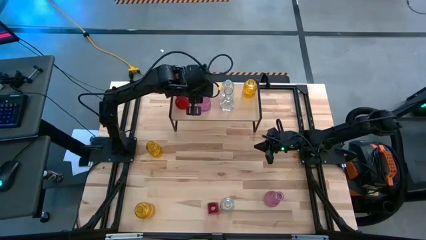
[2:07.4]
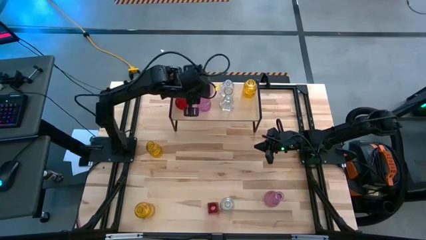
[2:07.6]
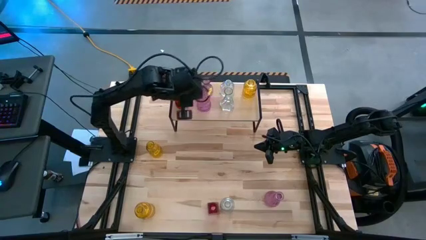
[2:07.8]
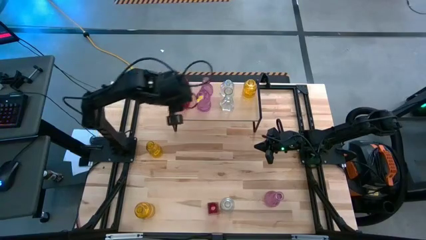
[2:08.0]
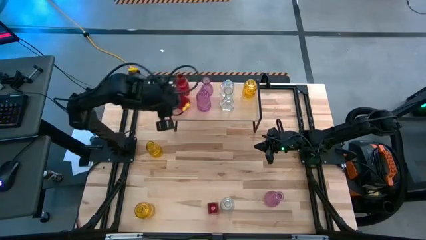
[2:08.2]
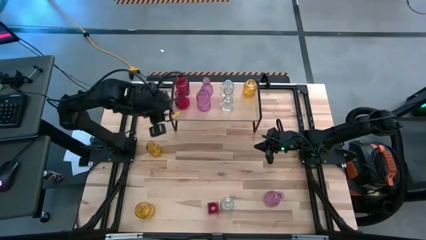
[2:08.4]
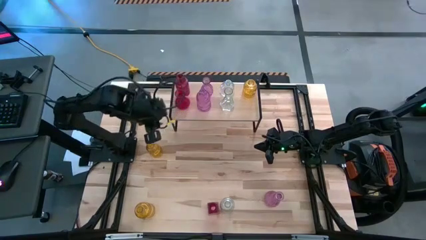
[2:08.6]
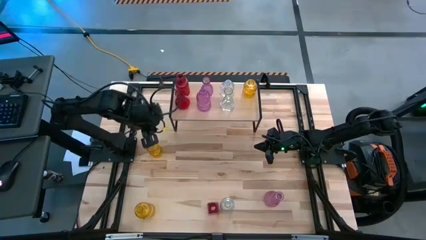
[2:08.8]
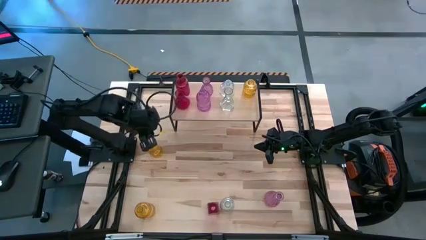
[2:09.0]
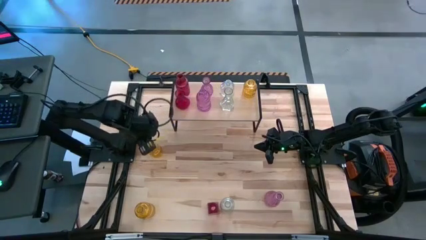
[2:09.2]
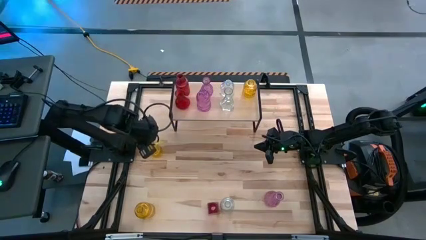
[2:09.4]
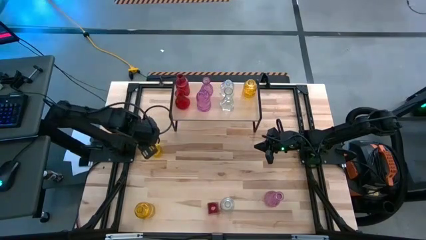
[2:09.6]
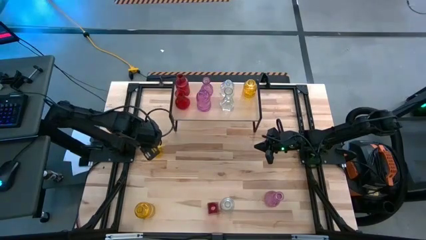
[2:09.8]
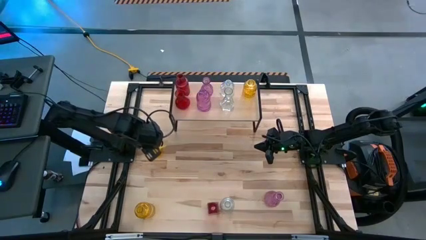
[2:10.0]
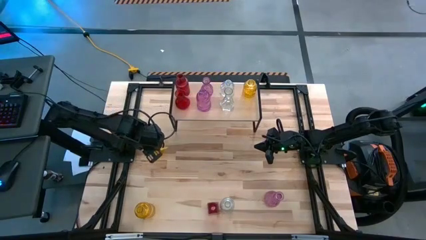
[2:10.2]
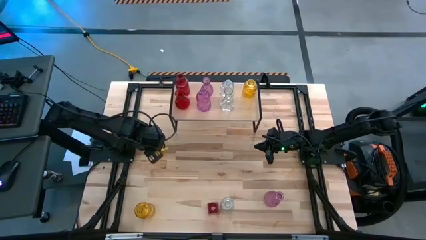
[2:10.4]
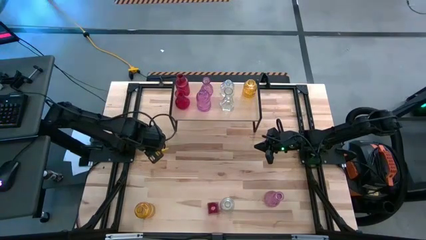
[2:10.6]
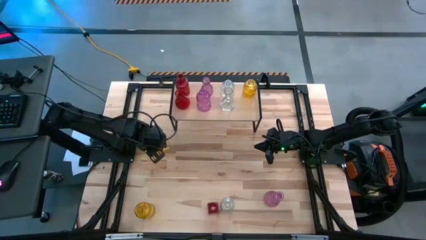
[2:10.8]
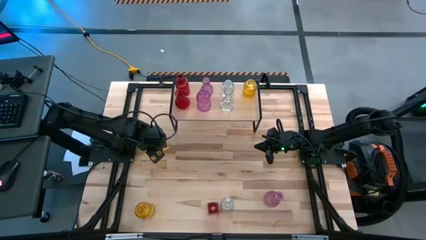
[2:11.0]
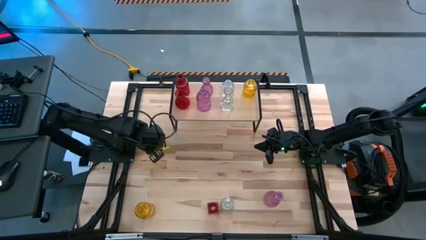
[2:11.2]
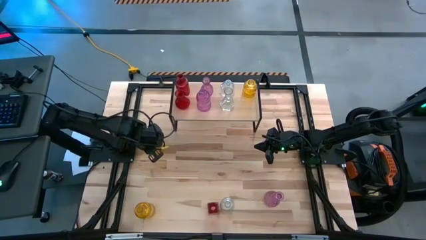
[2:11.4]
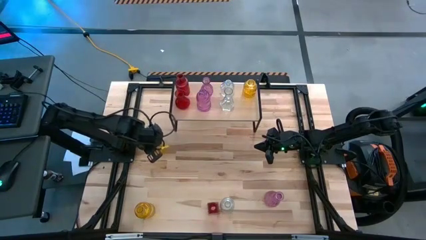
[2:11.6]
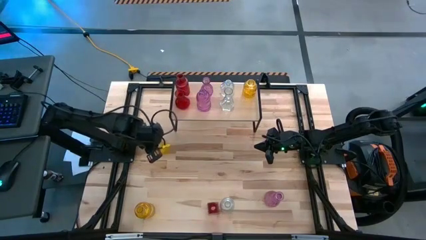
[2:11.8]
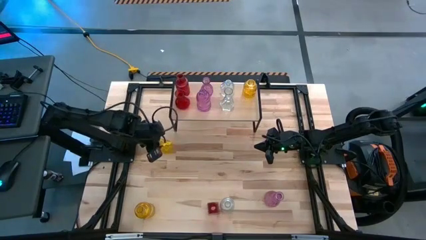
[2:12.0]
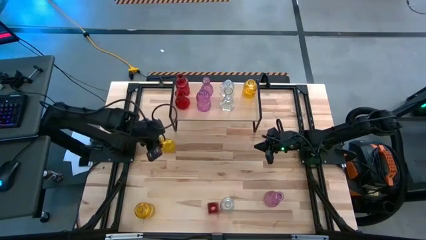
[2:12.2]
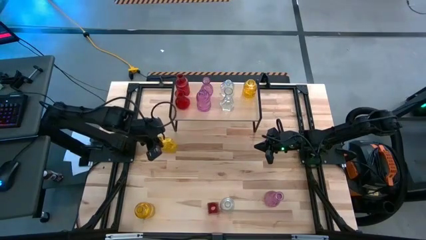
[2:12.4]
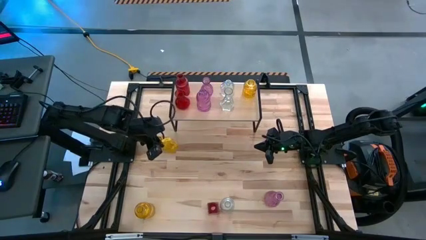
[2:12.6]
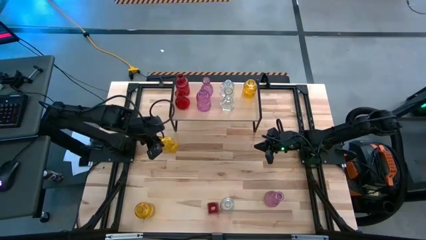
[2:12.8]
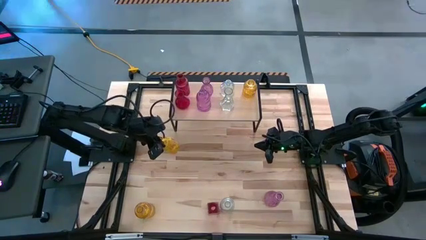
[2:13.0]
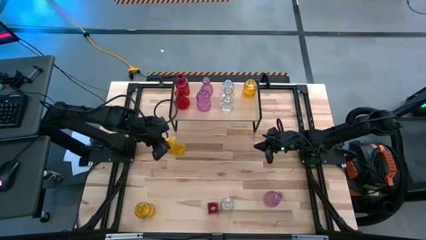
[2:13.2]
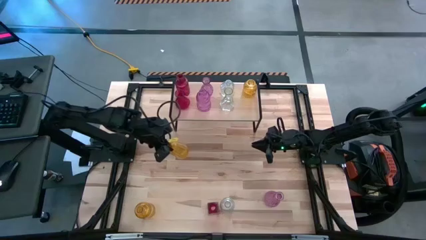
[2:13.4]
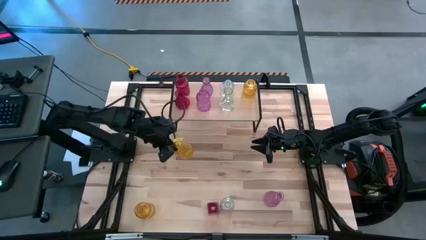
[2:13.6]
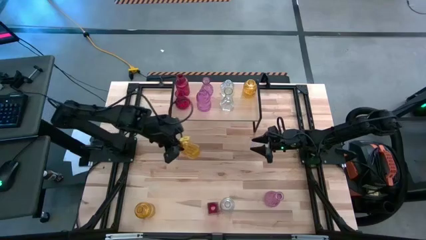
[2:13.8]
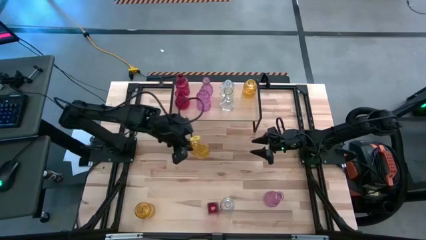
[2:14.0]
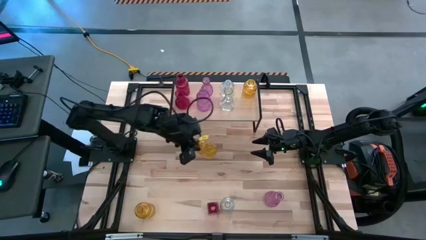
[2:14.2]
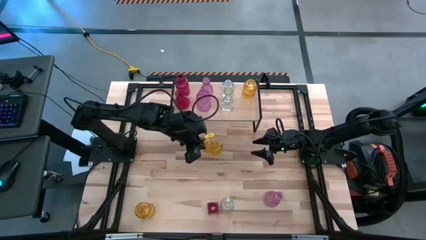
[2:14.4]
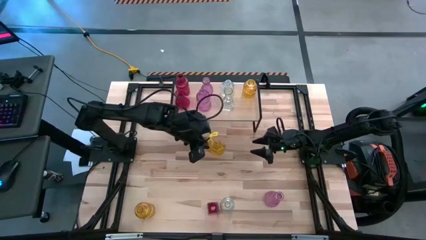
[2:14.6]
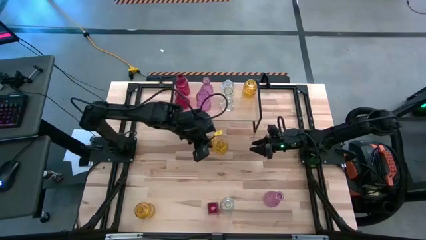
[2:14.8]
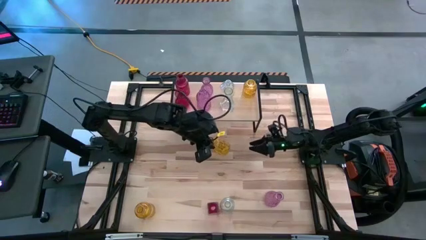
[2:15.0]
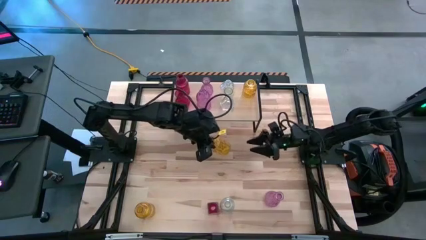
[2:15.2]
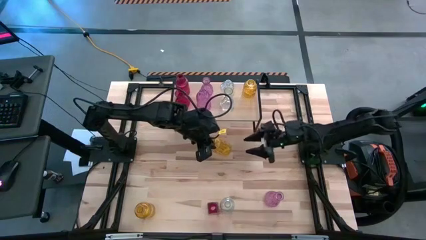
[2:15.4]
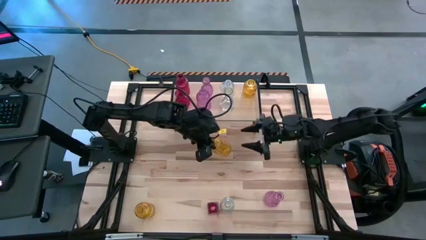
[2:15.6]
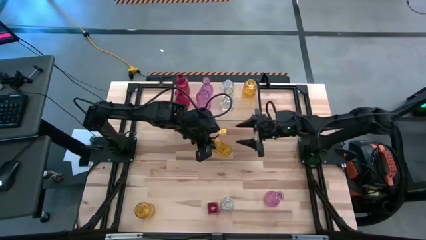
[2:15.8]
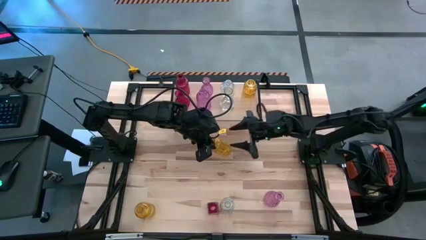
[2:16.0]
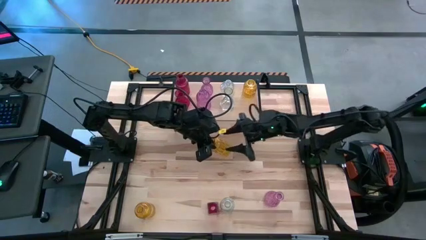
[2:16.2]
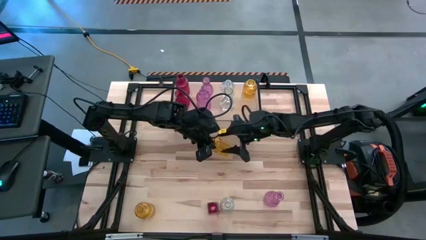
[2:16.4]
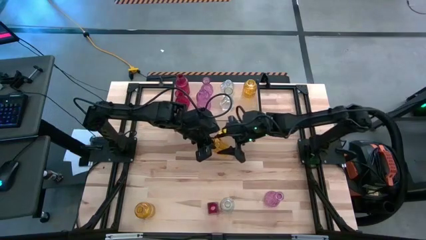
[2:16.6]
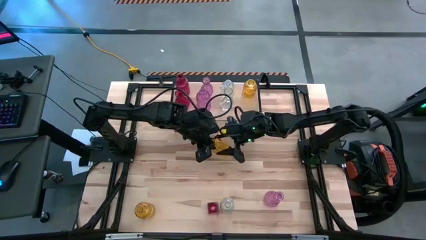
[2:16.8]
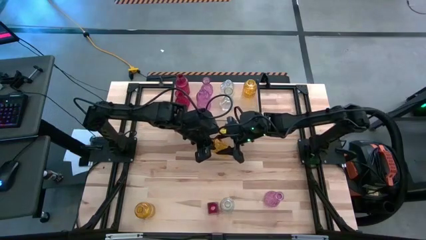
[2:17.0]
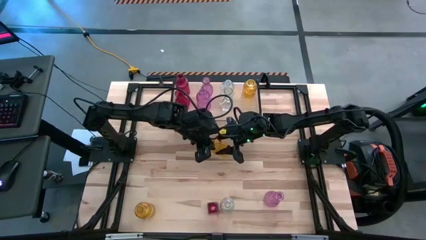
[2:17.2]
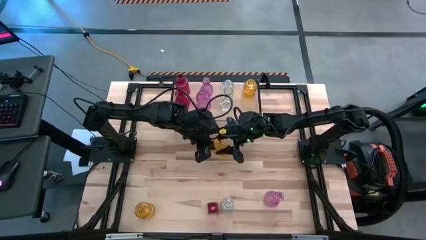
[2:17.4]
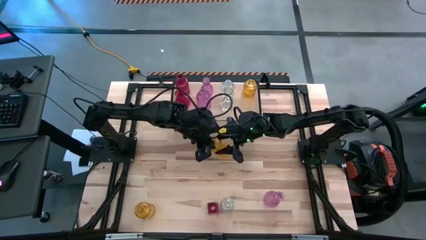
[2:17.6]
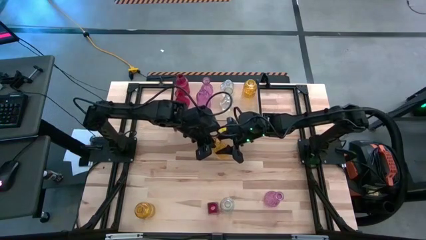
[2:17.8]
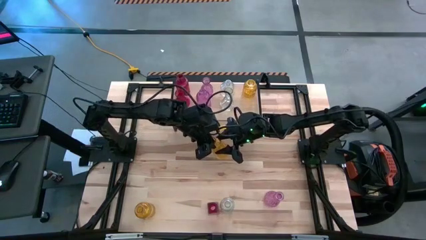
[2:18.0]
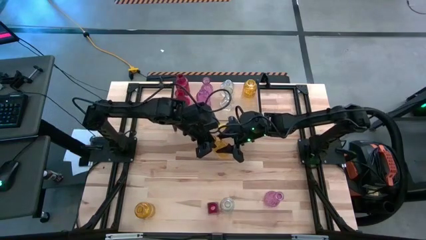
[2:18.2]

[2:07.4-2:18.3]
Task: sort vases onto shelf
Put the top yellow vase on the shelf aligned with the other yellow vase
